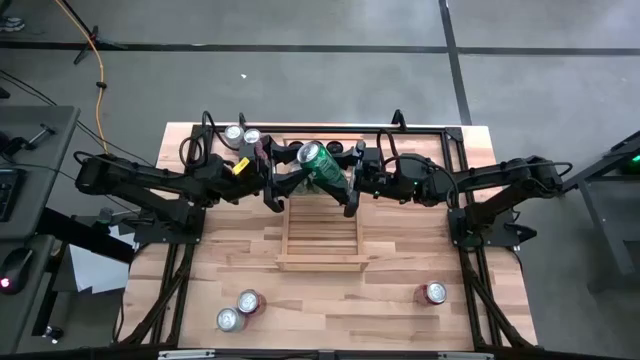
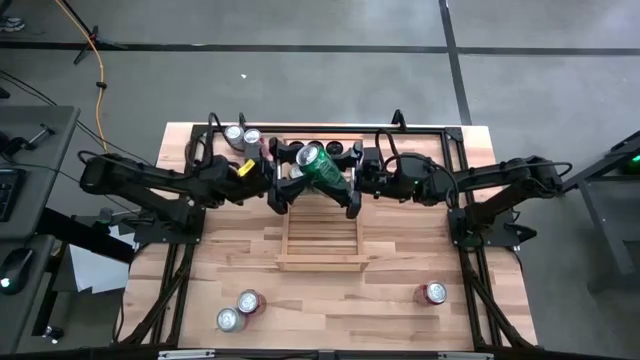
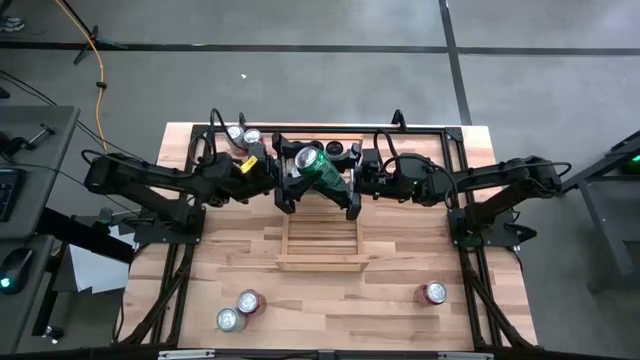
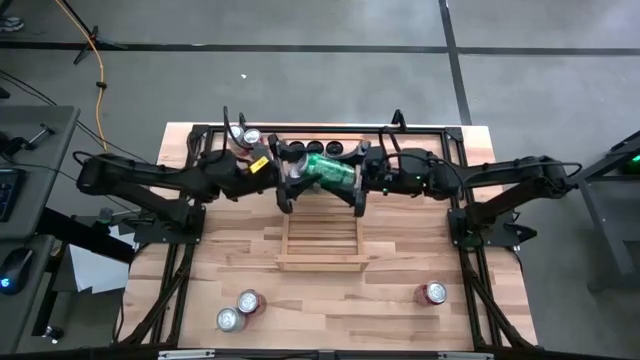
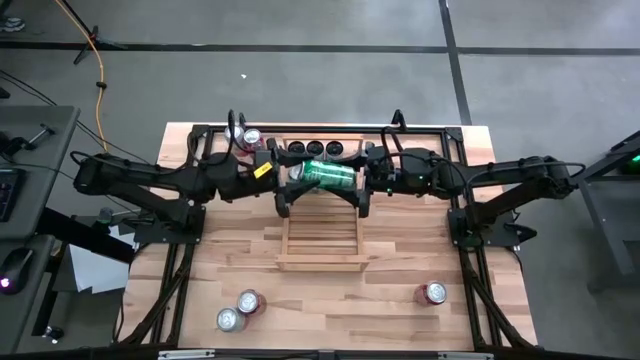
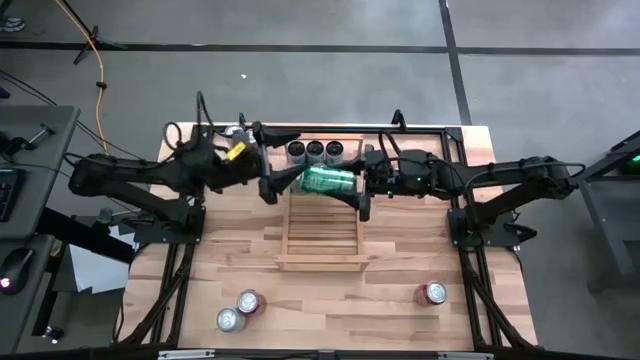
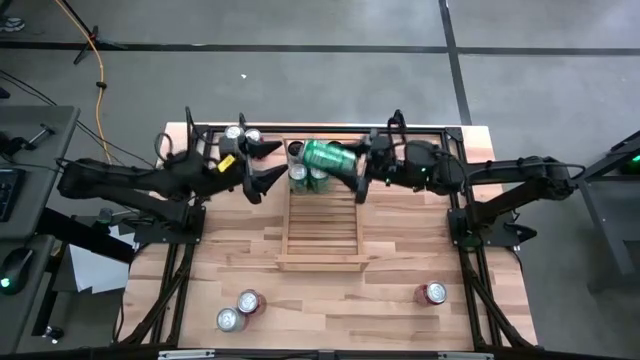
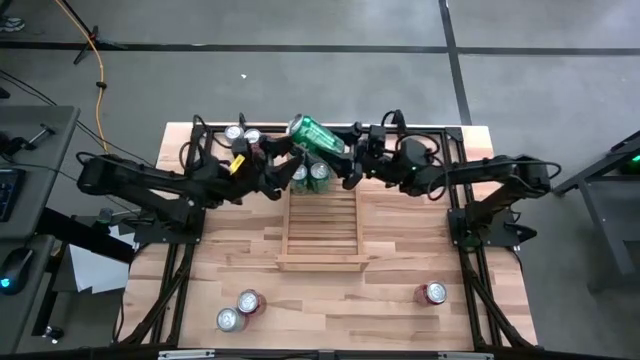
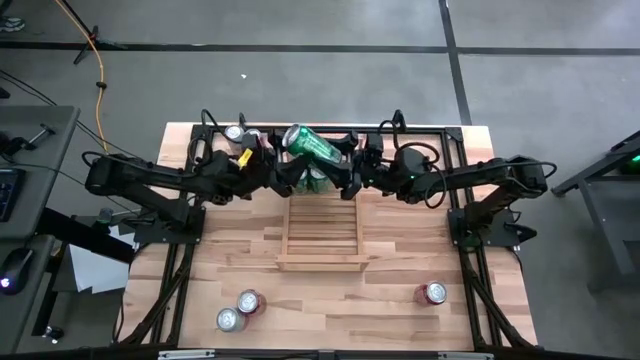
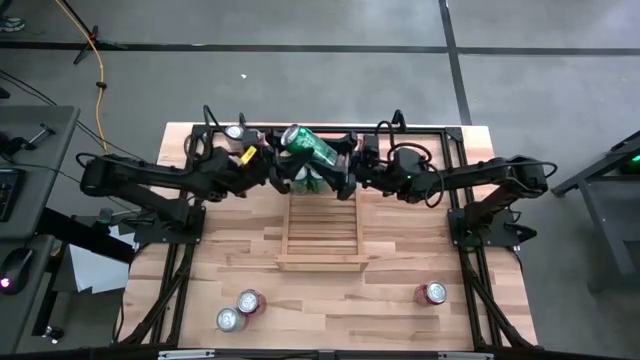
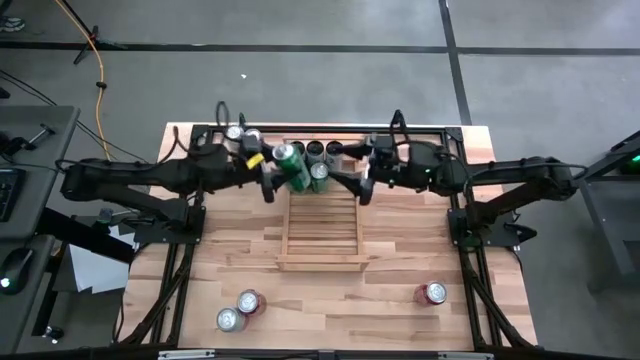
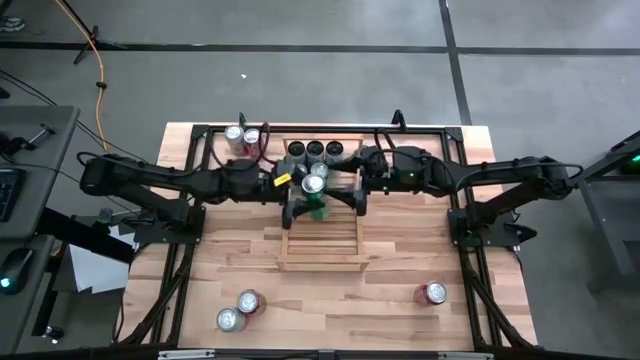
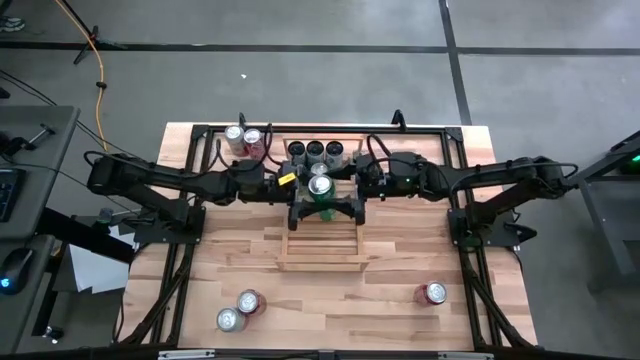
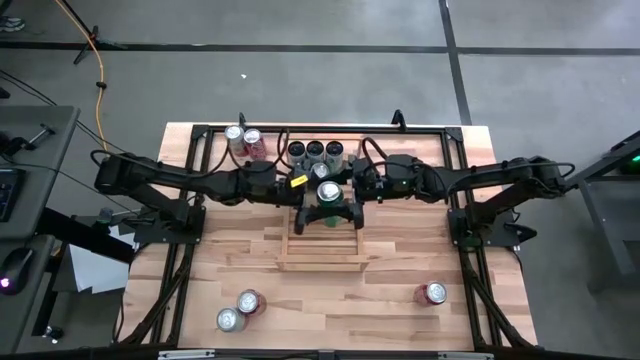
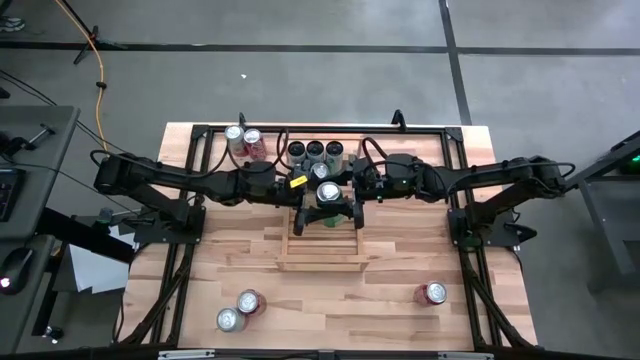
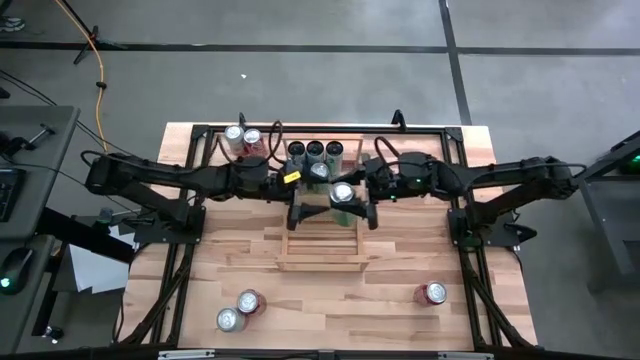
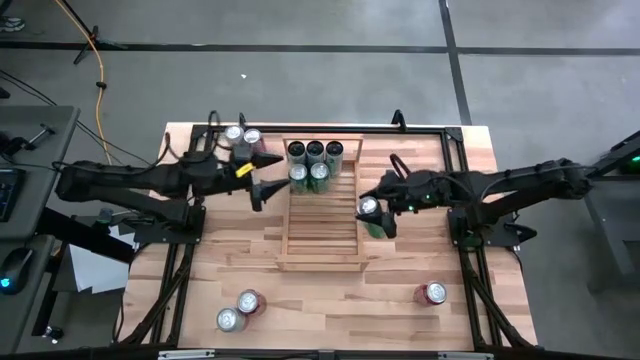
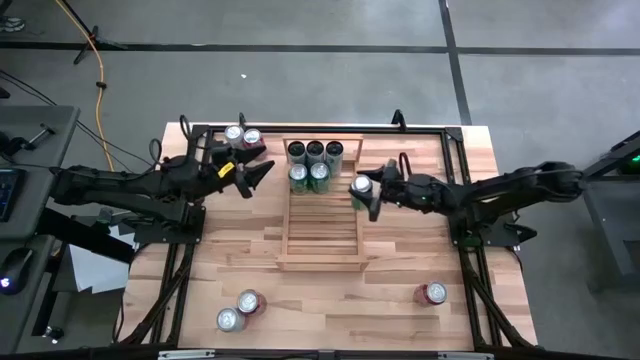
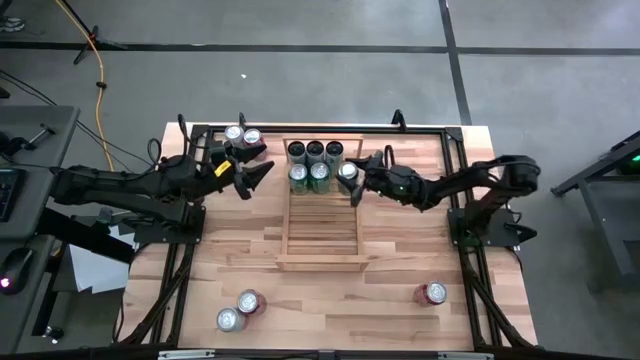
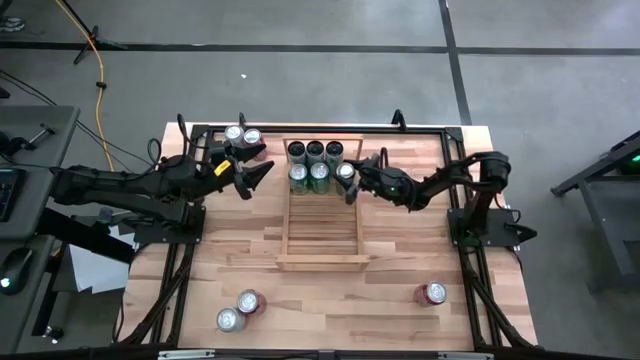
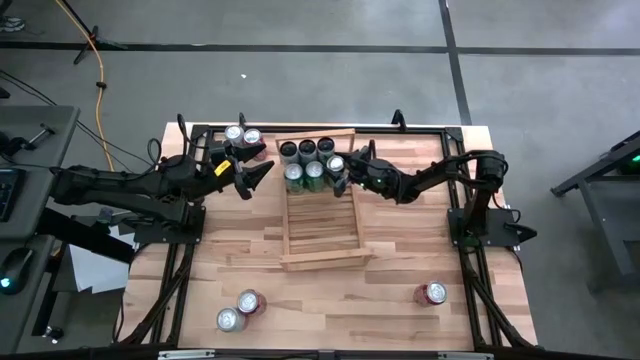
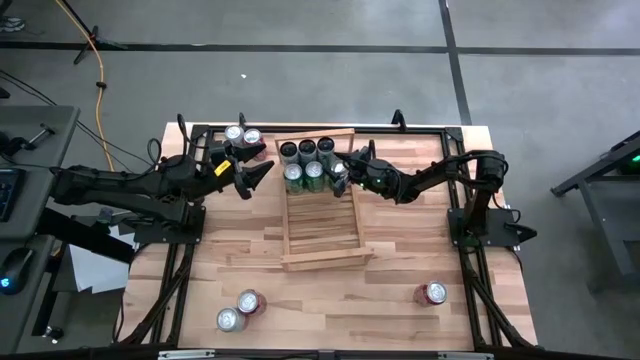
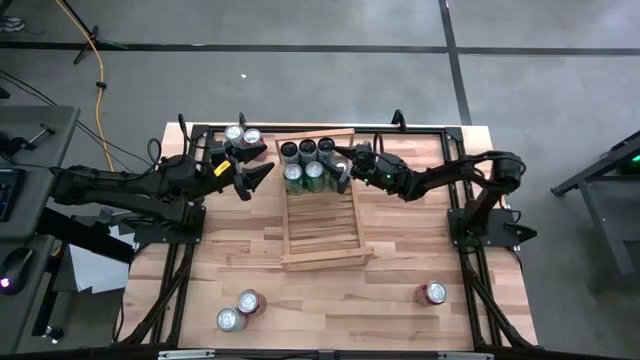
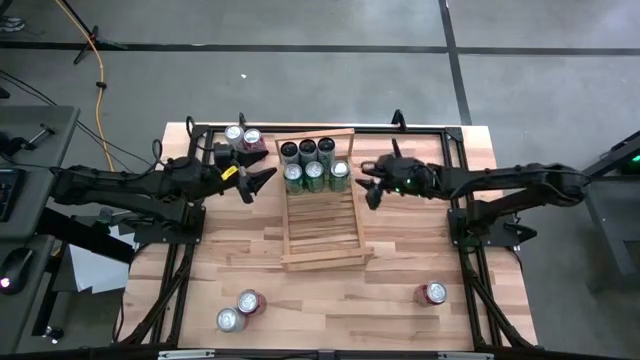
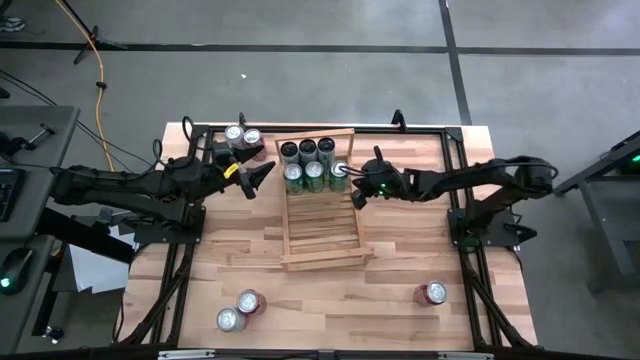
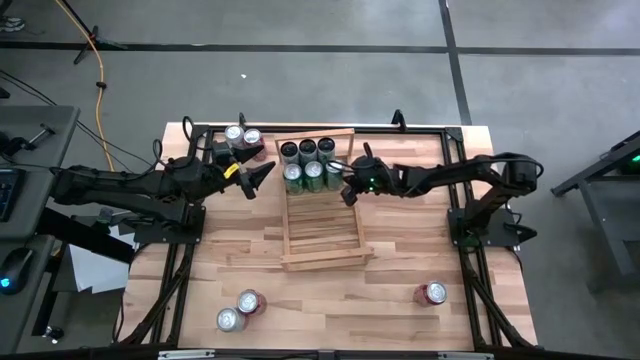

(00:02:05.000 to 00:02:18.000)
Task: Place canned beverage on shelf
Put the green can on the shelf aligned with the other green cans

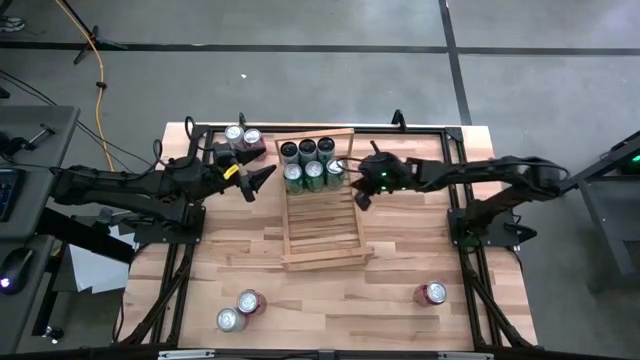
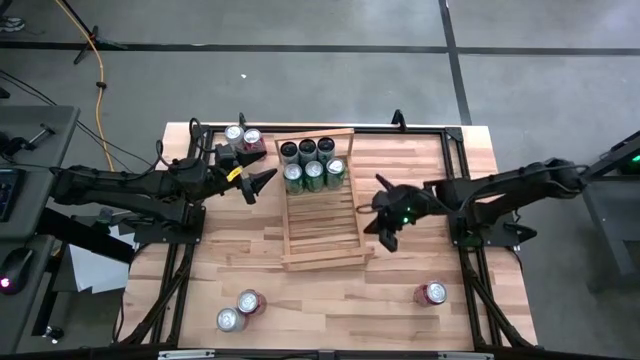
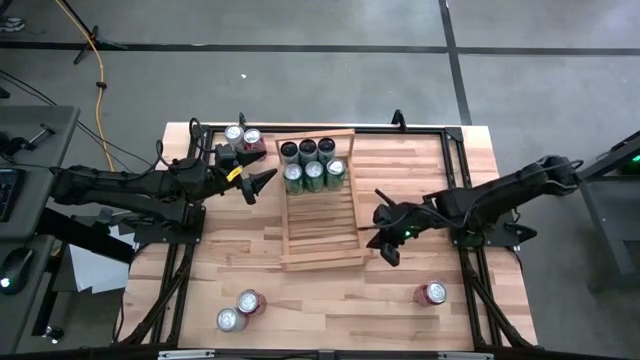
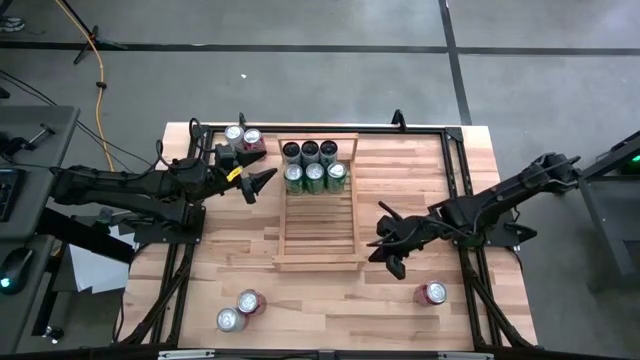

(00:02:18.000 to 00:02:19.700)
Adjust the shelf

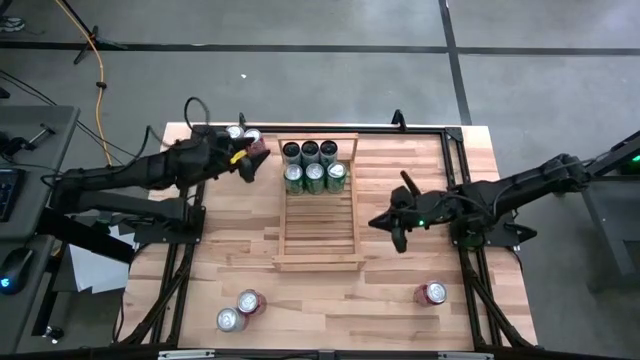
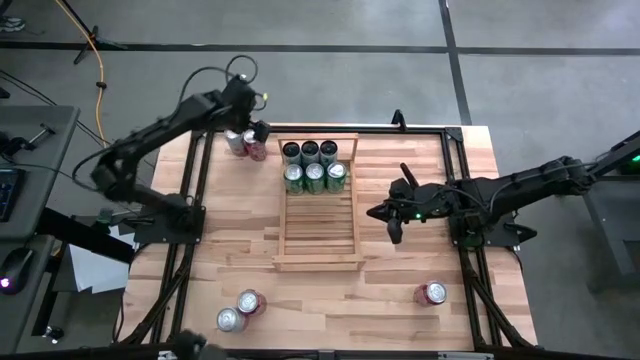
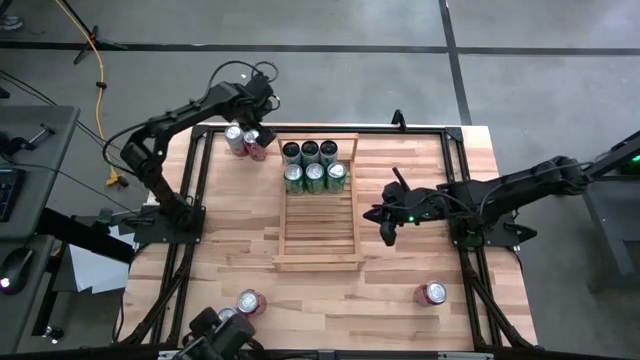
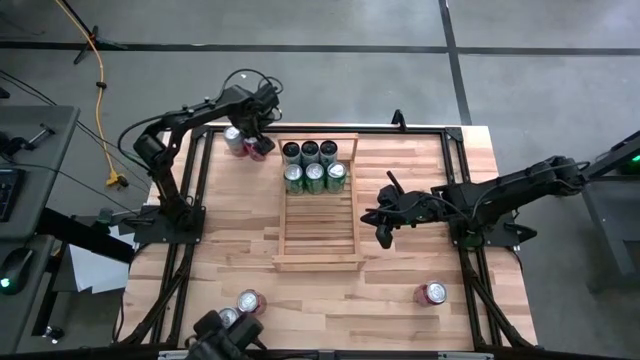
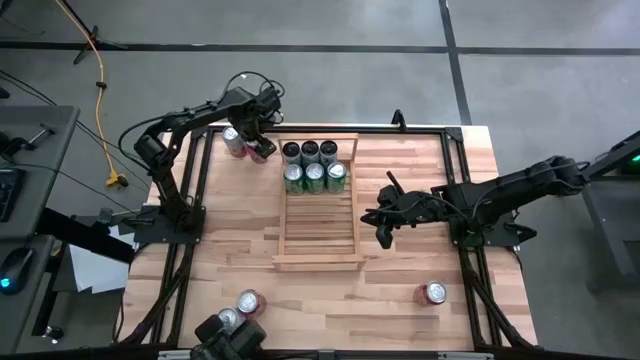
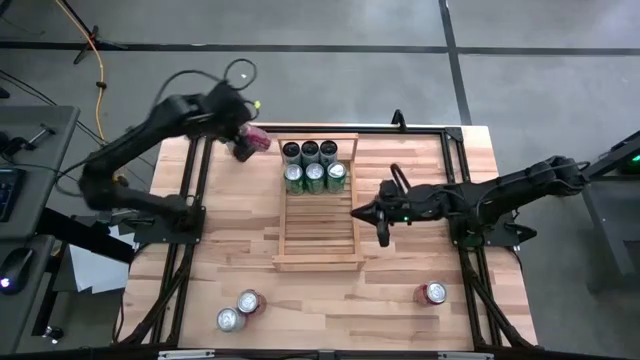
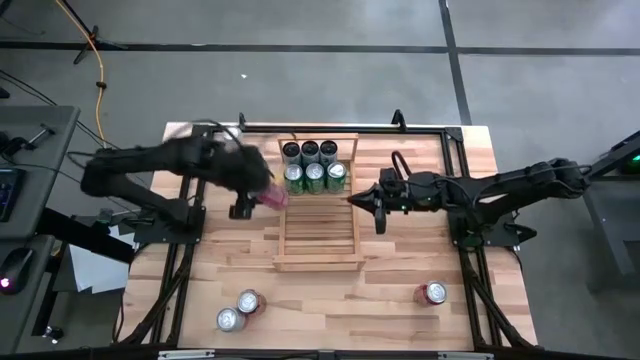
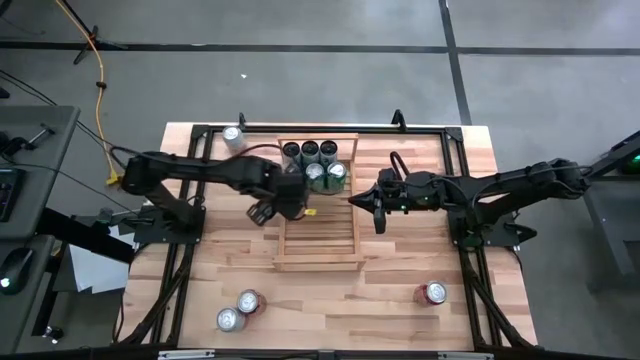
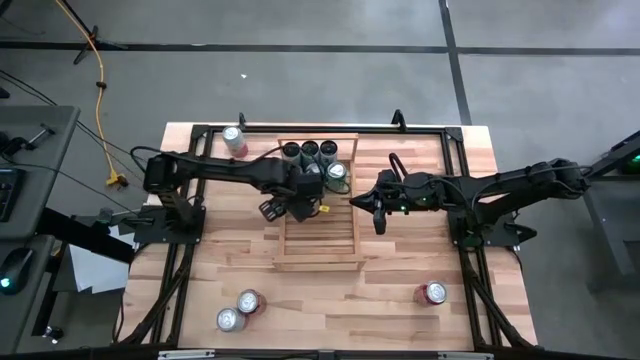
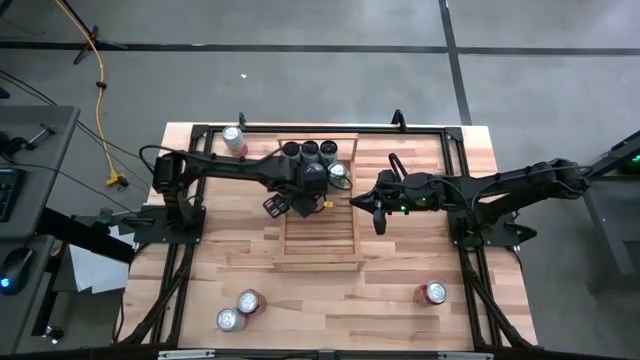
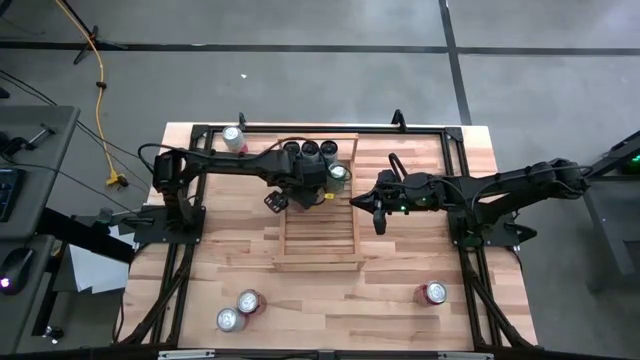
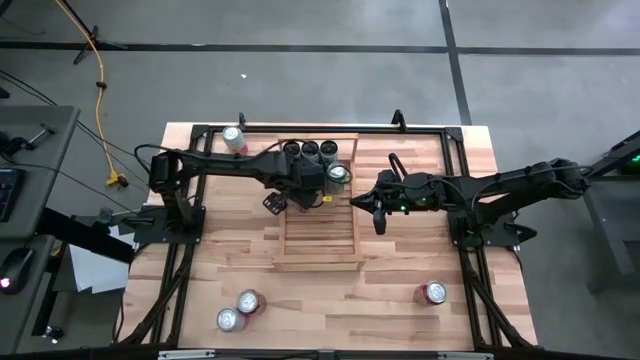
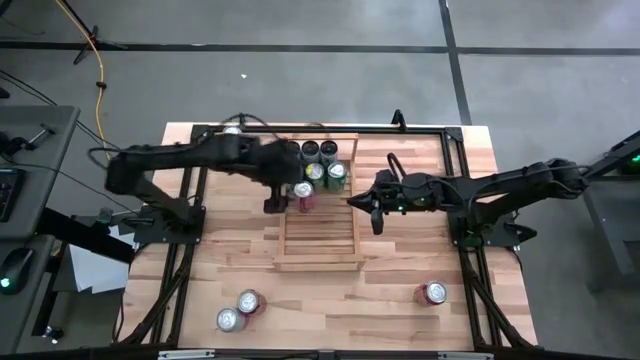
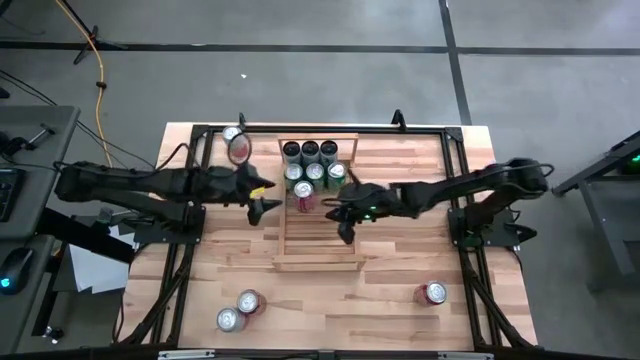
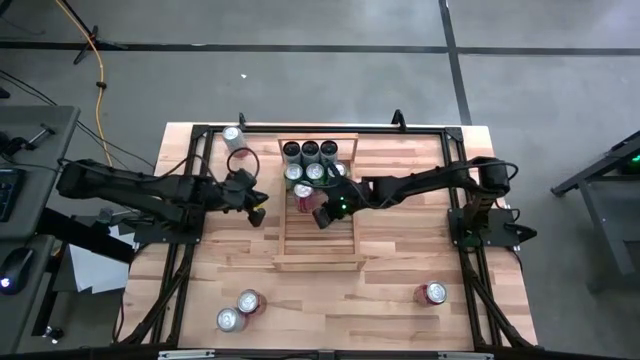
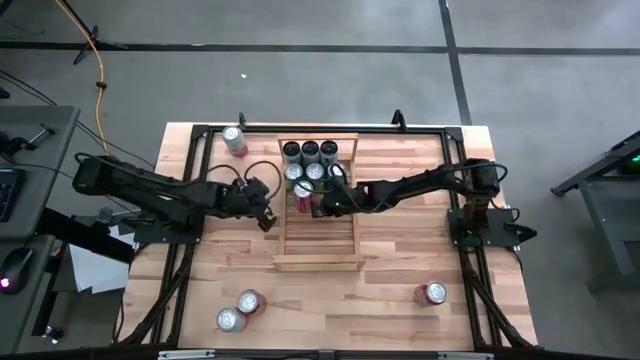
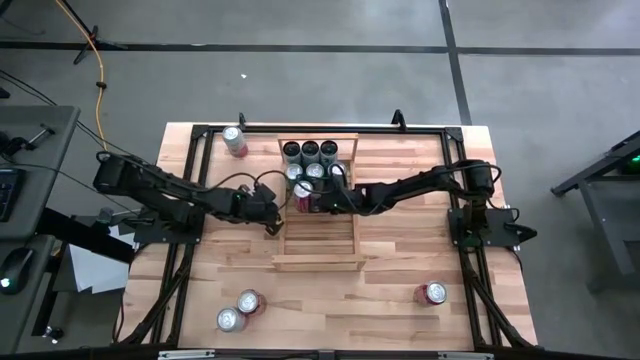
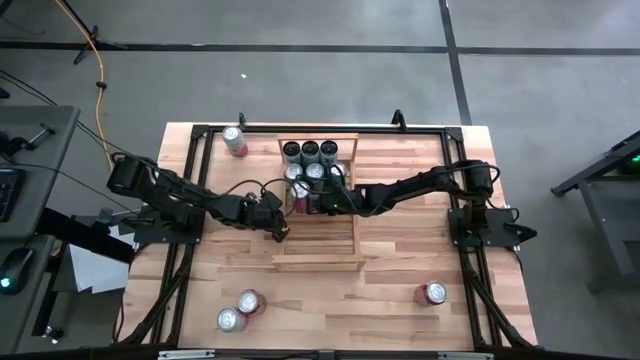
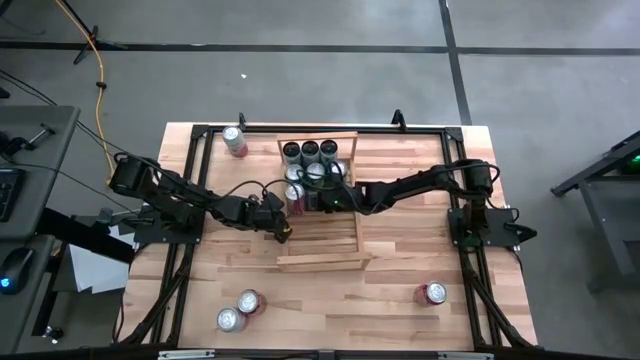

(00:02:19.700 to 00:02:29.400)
Put the top left red can on the shelf
